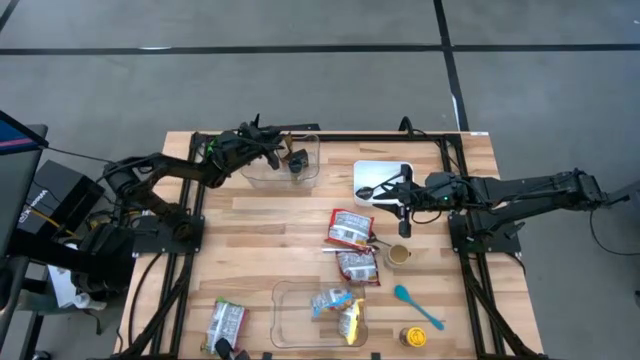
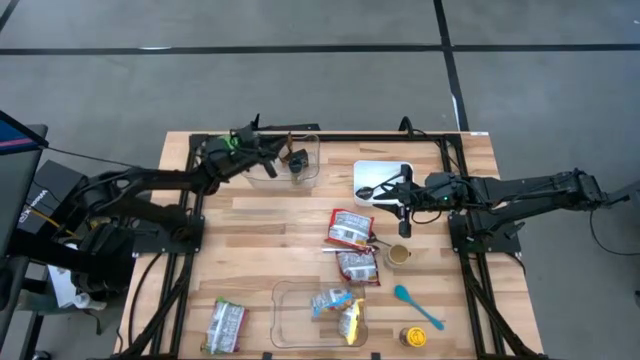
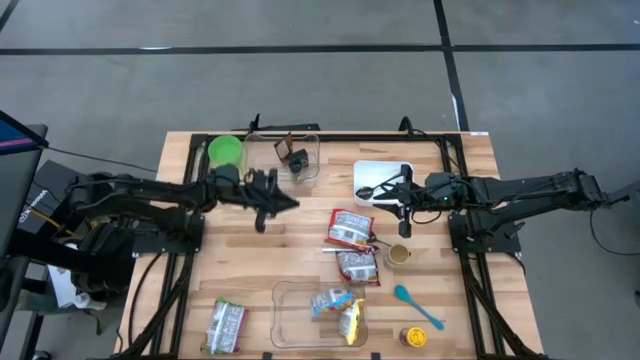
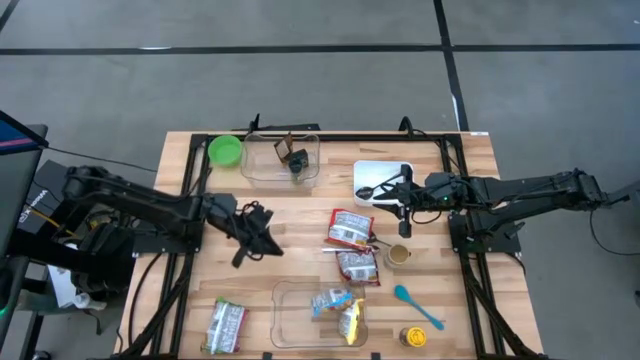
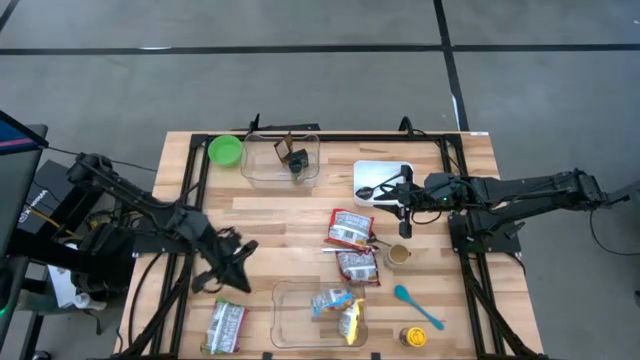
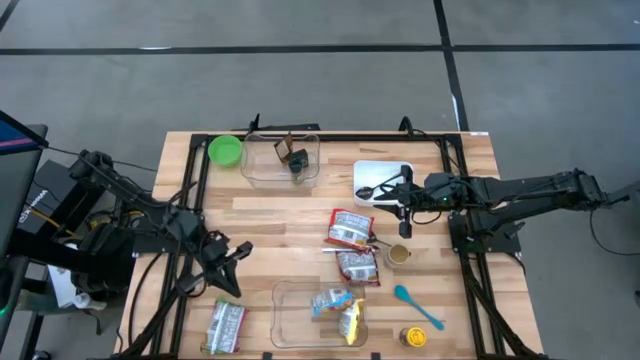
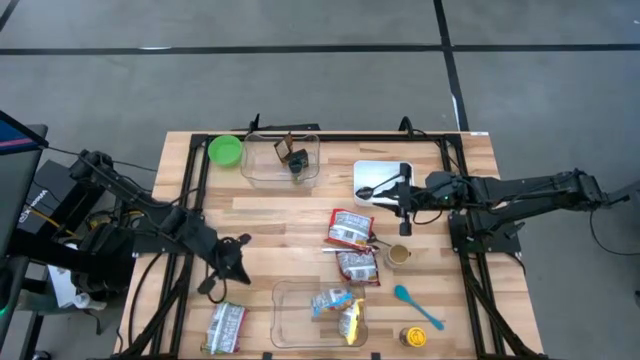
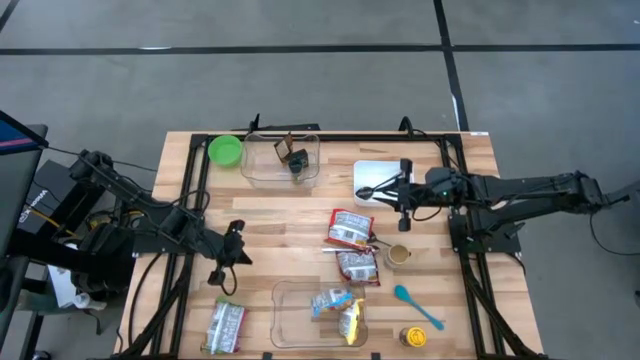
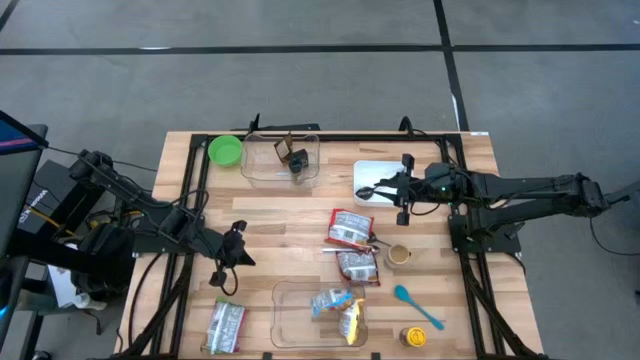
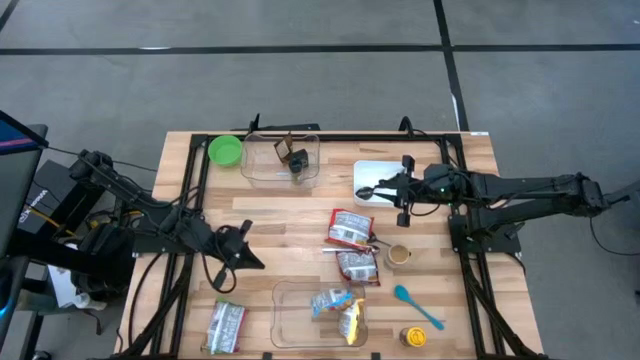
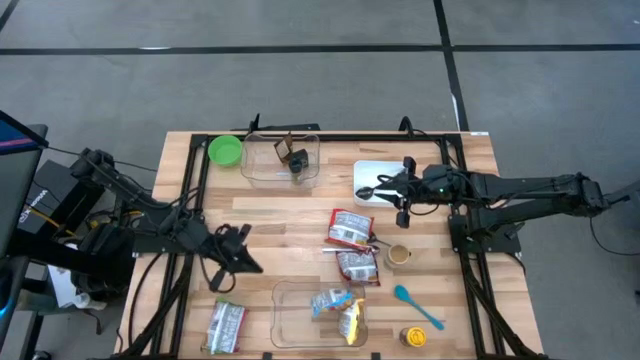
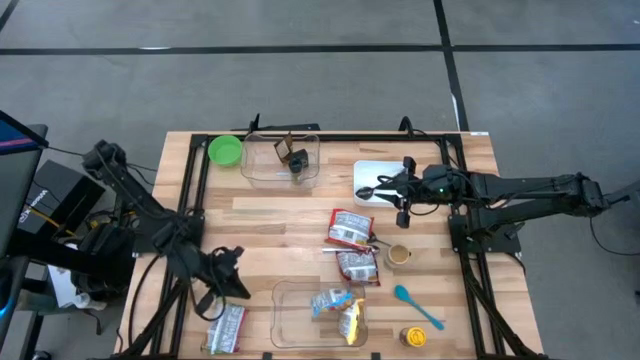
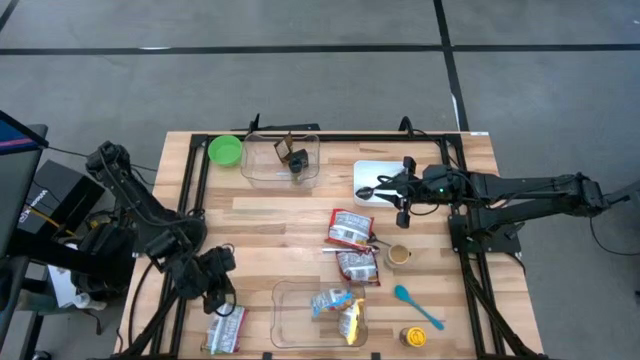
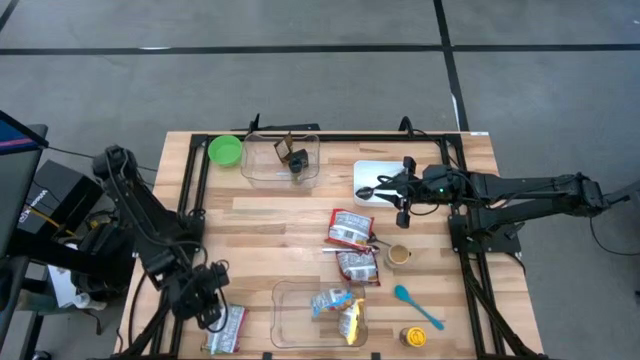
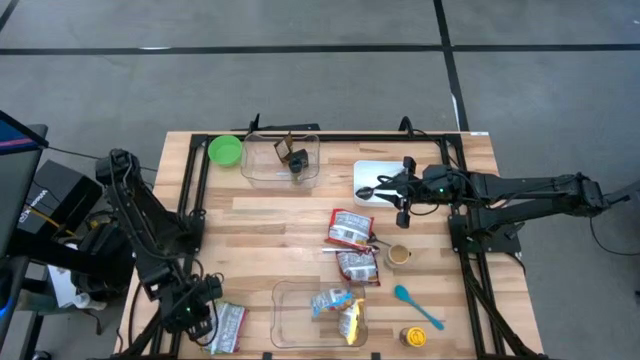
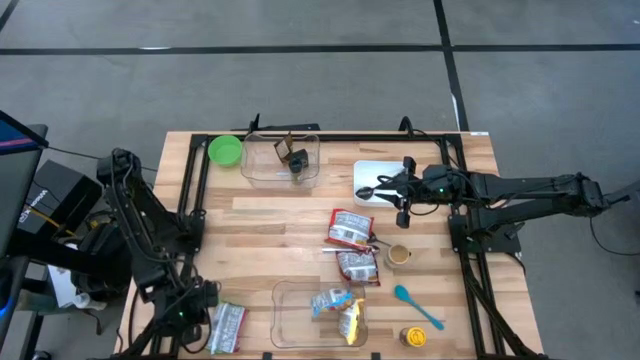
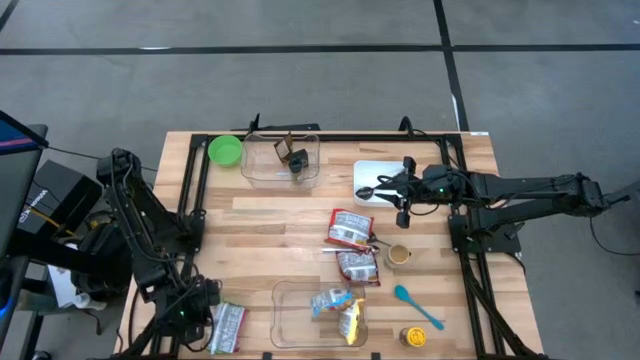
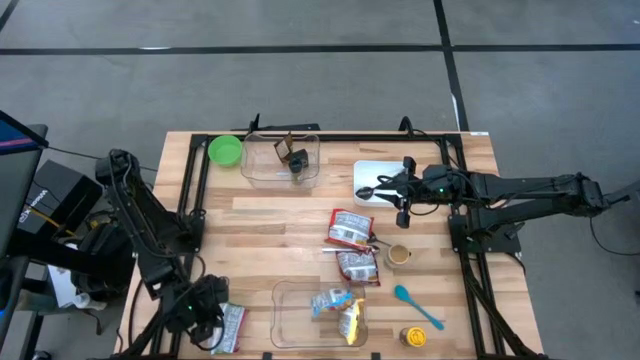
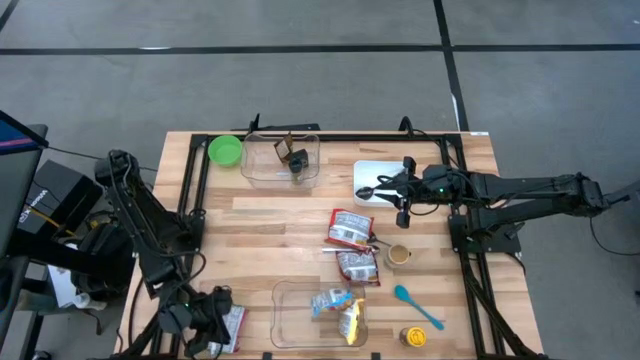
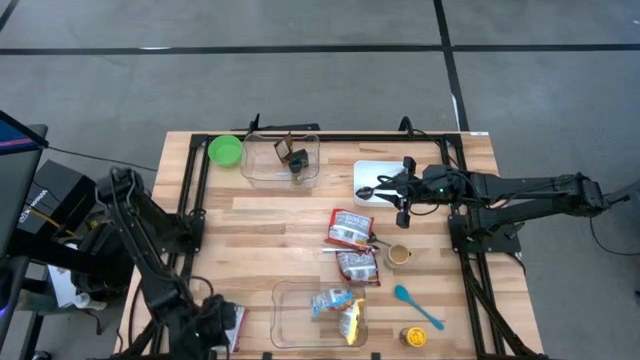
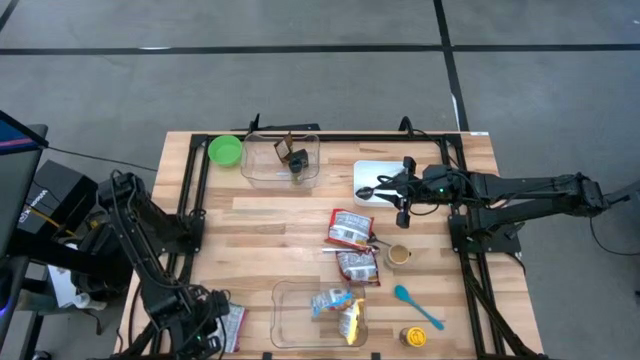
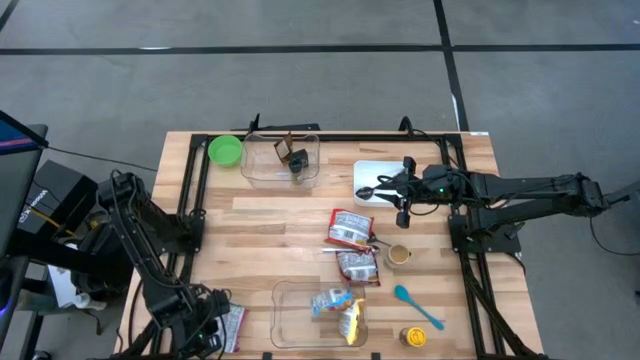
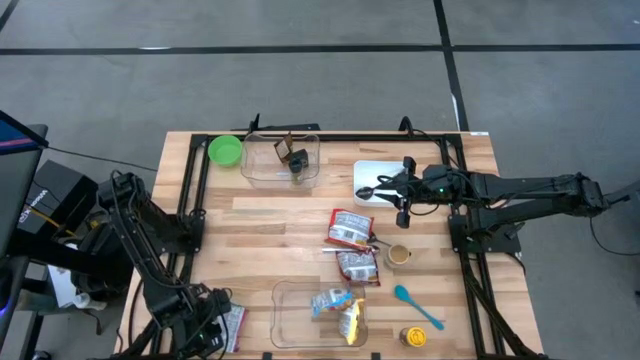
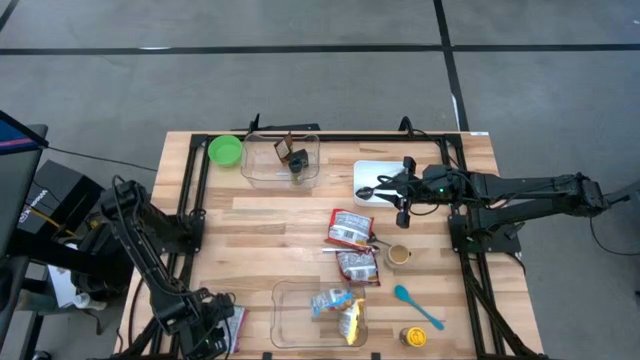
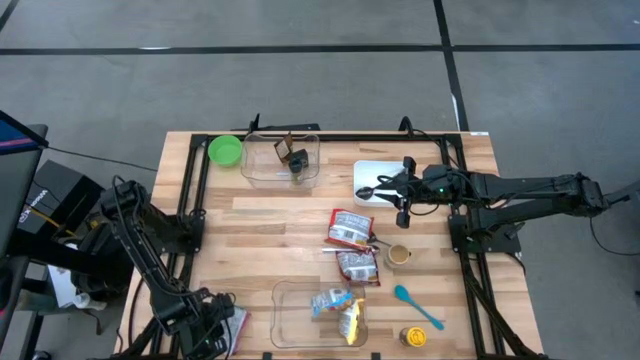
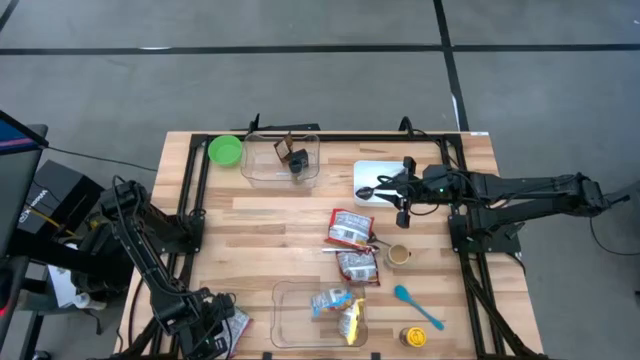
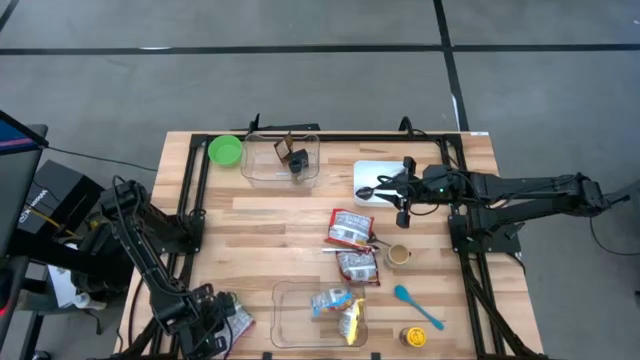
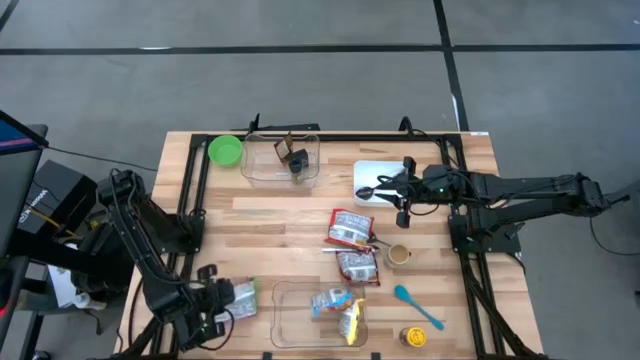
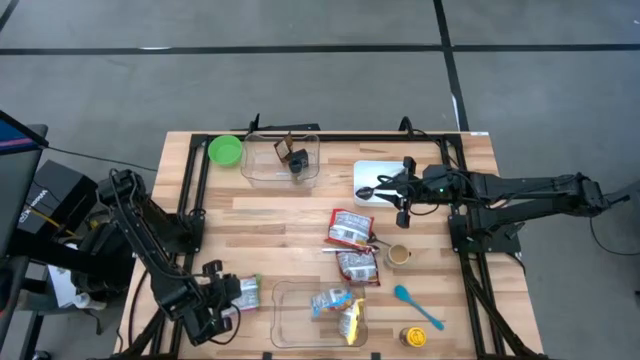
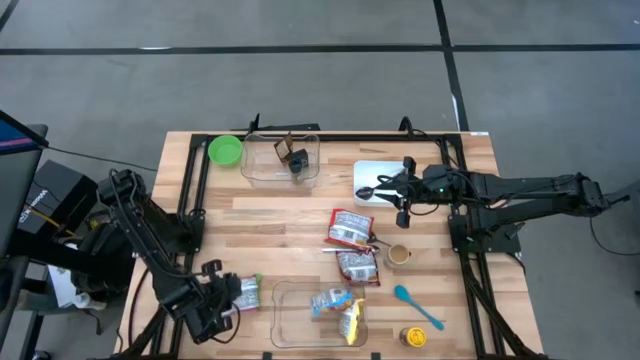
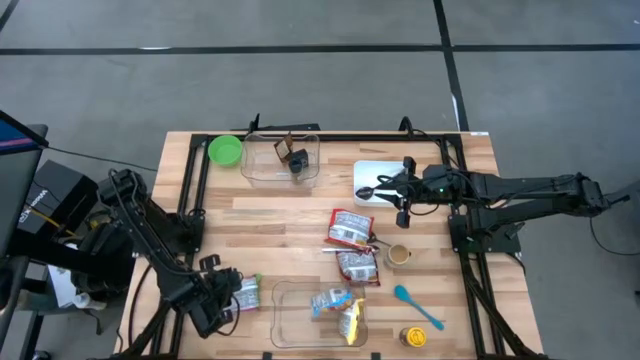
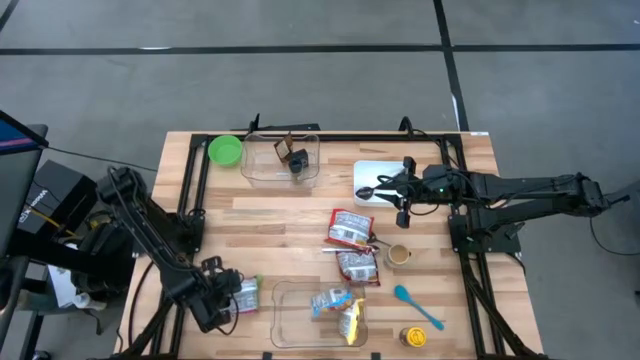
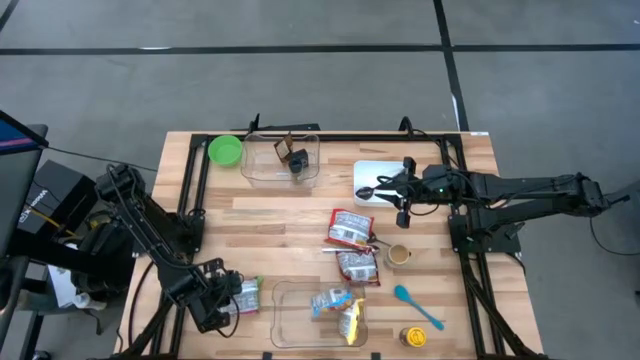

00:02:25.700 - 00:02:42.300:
Task: Pick & Place Food Item
Put the green noodle pack into the bottom transparent bin

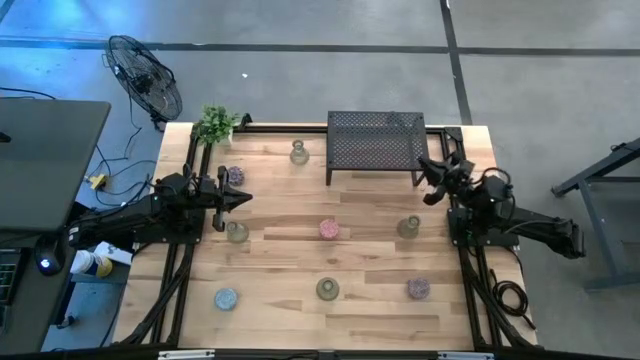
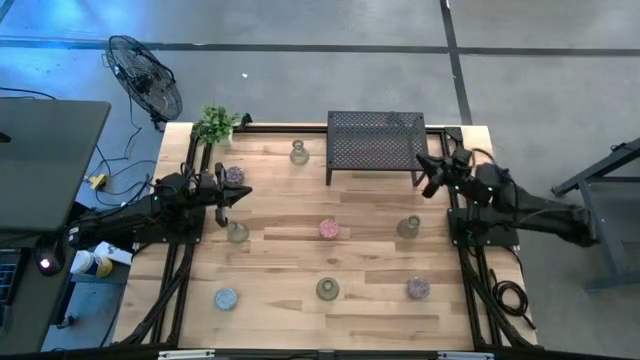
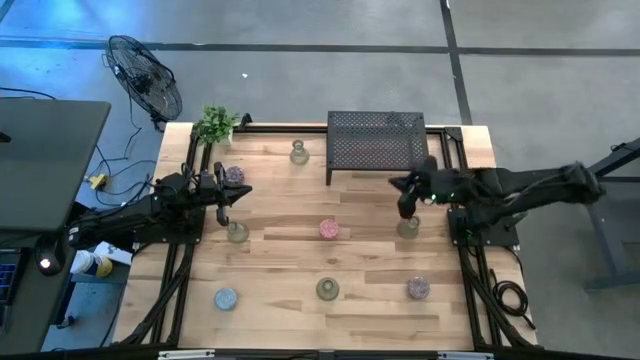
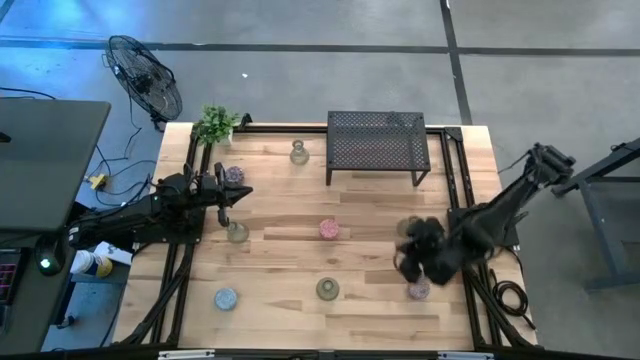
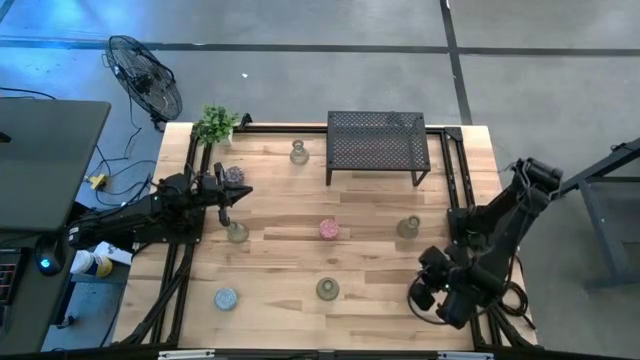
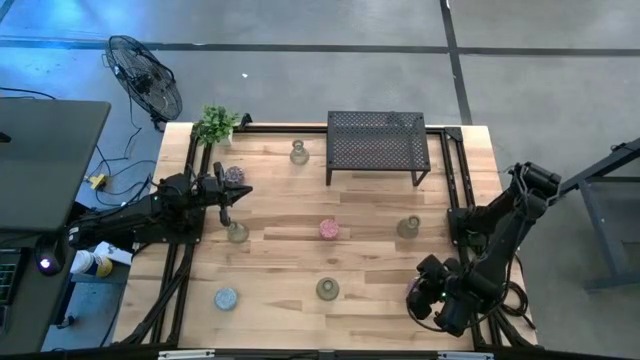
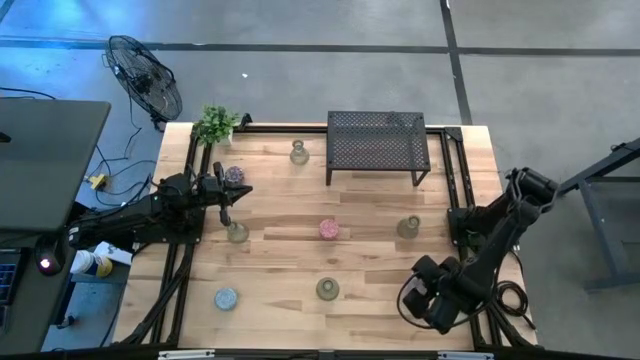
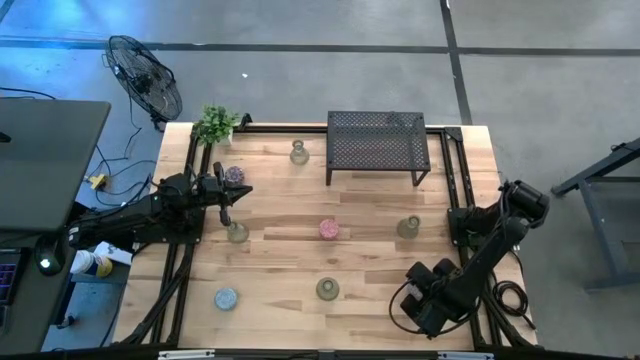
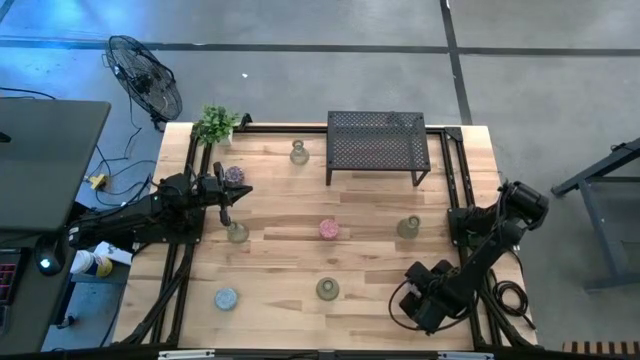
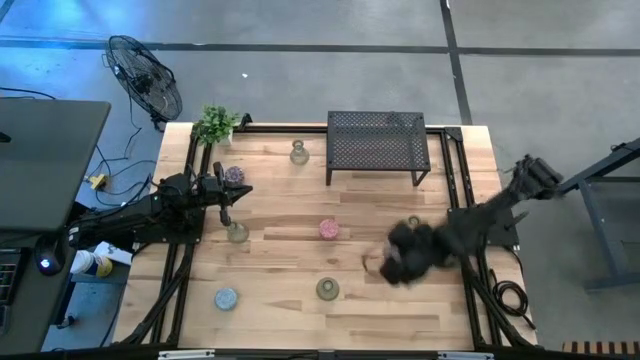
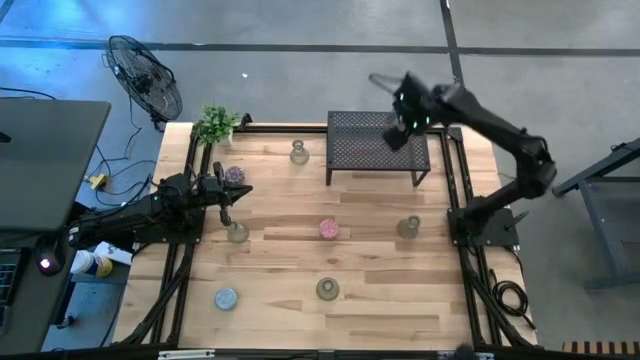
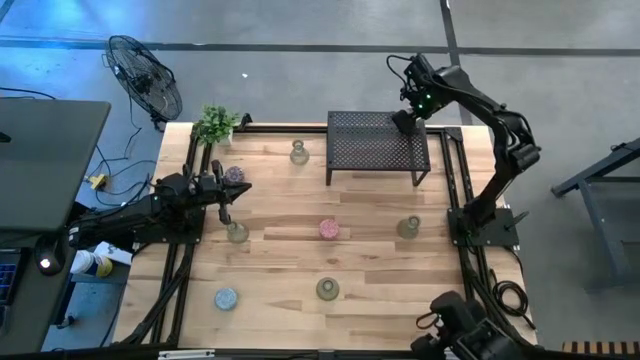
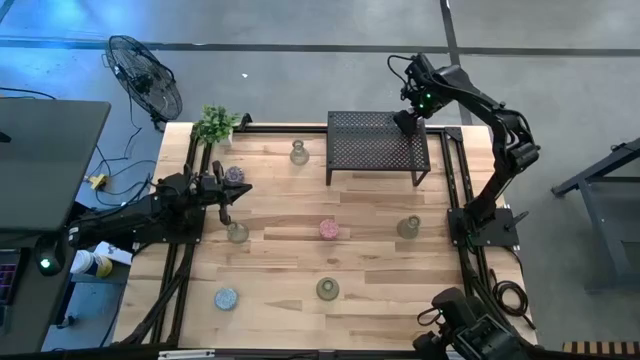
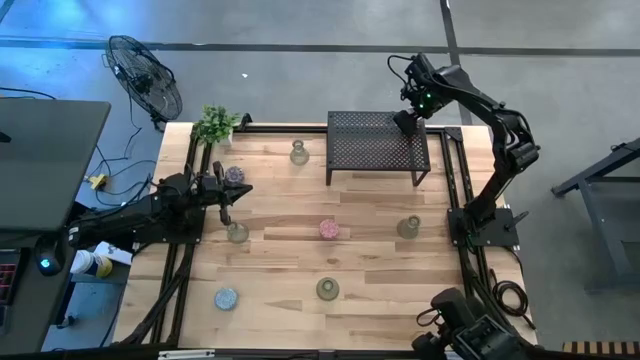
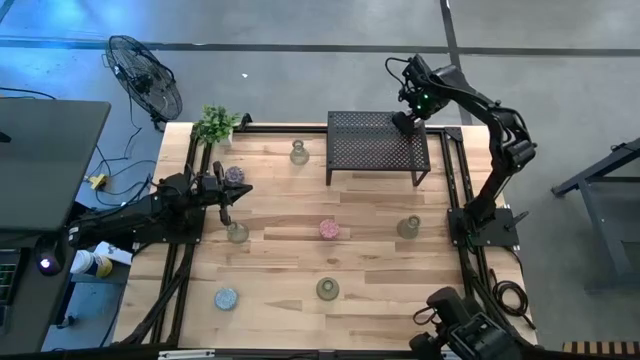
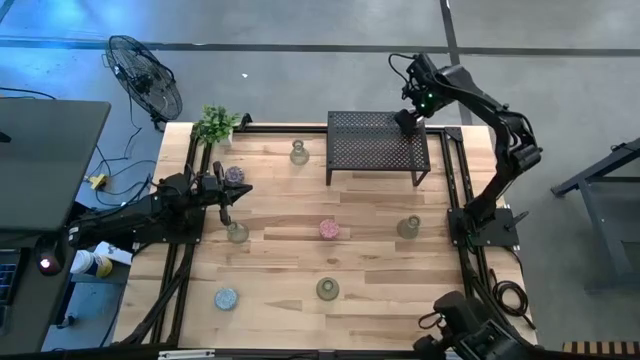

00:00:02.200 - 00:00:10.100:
Task: Pick & Place candle stick holders
Put the red scented candle on the shelf
